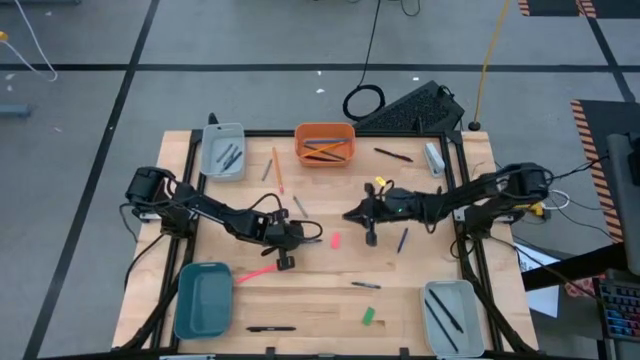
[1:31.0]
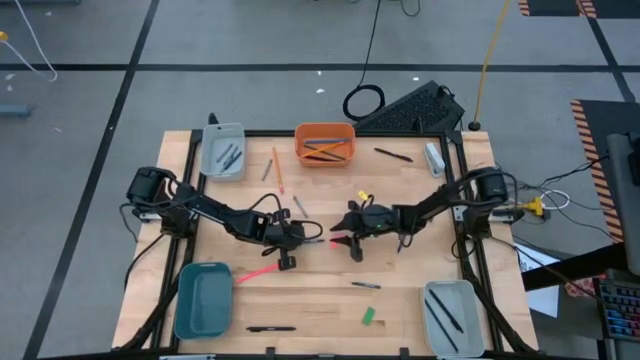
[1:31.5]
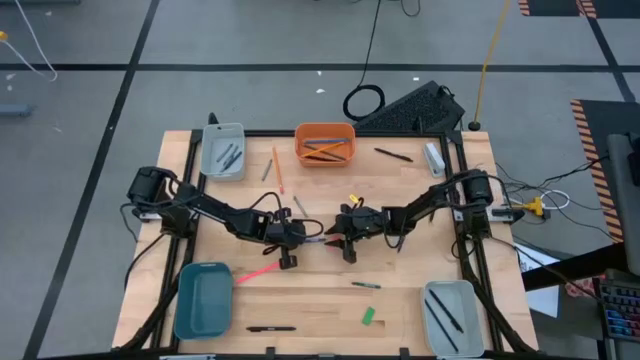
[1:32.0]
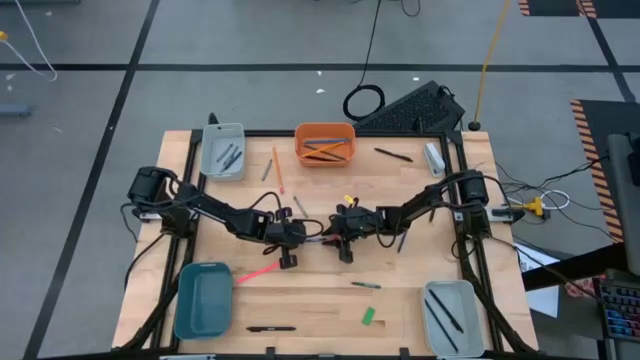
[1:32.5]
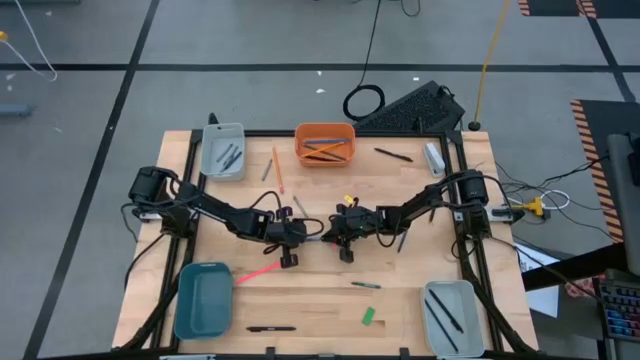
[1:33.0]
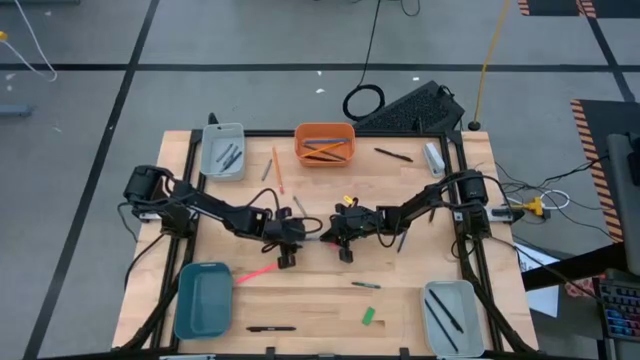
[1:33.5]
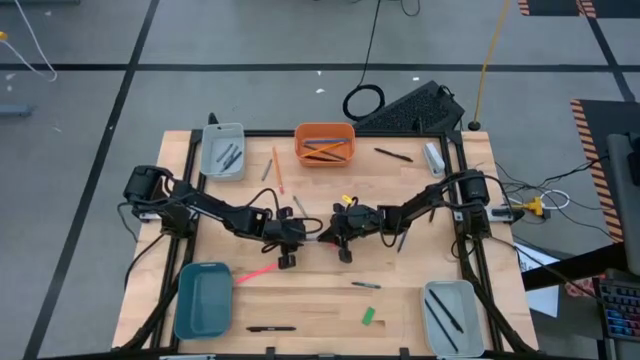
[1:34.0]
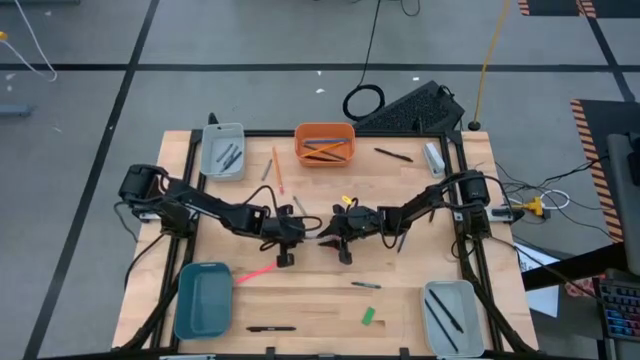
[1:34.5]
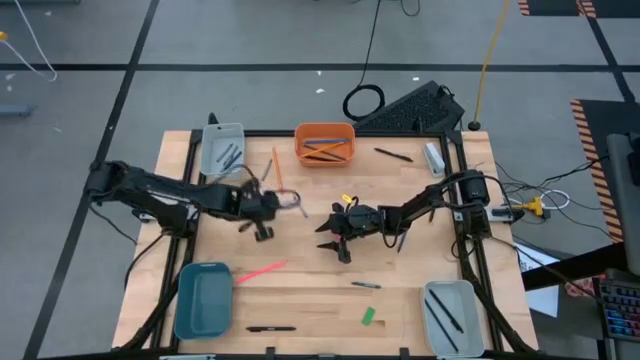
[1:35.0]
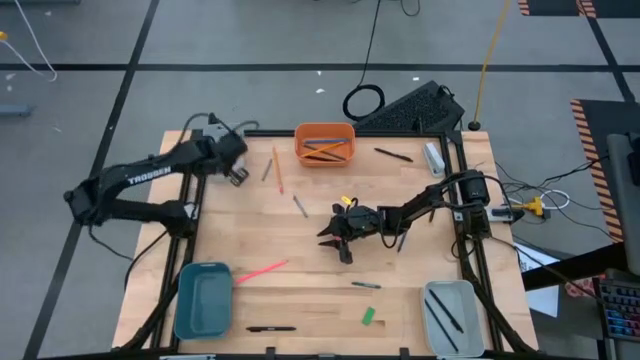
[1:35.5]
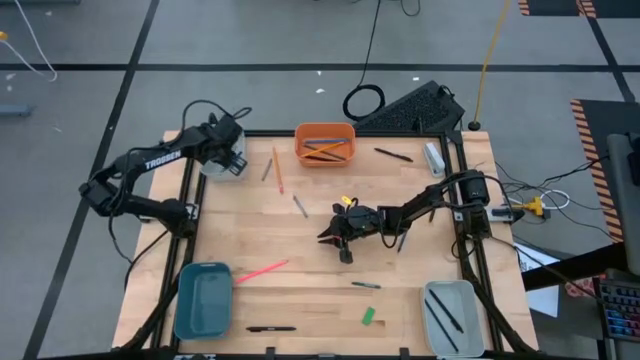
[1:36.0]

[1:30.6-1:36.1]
Task: Sort crayons/erasers/pens/pencils in bins
Put the blue crayon into the top gray bin

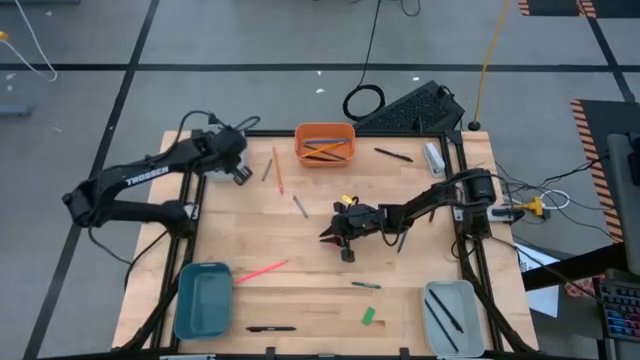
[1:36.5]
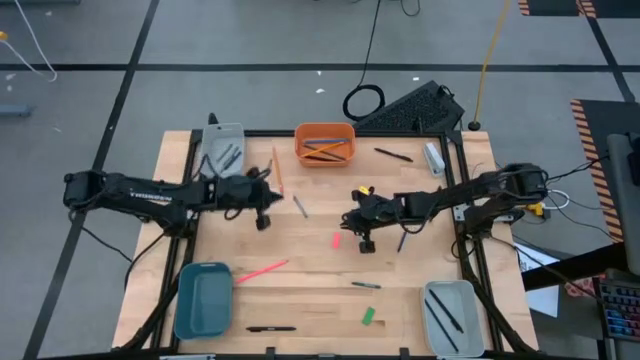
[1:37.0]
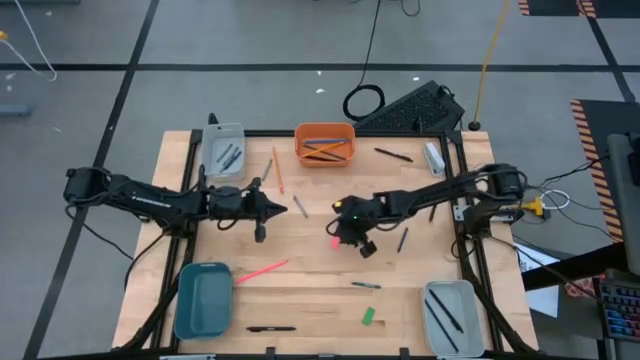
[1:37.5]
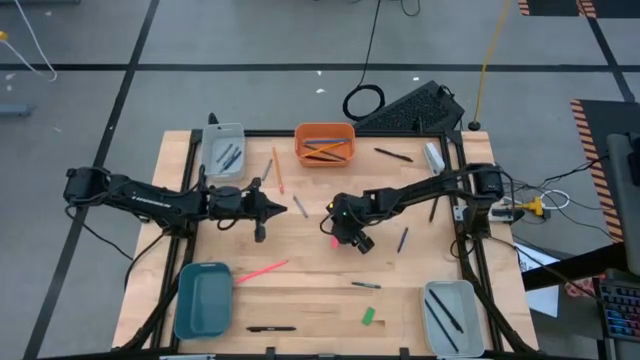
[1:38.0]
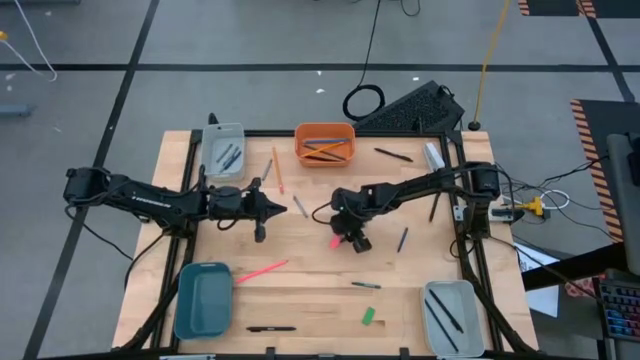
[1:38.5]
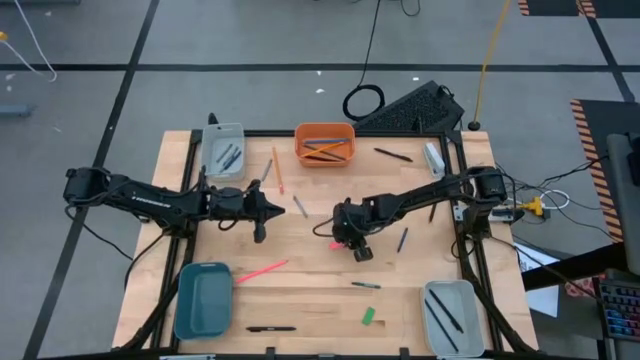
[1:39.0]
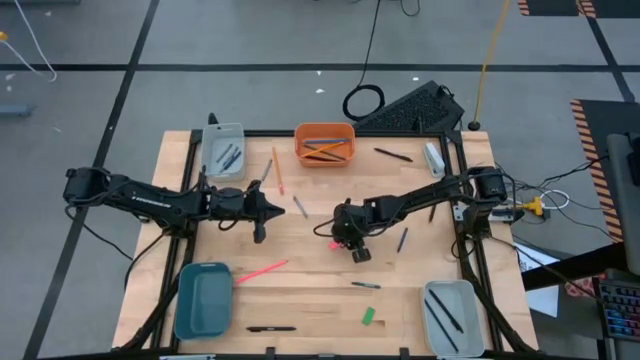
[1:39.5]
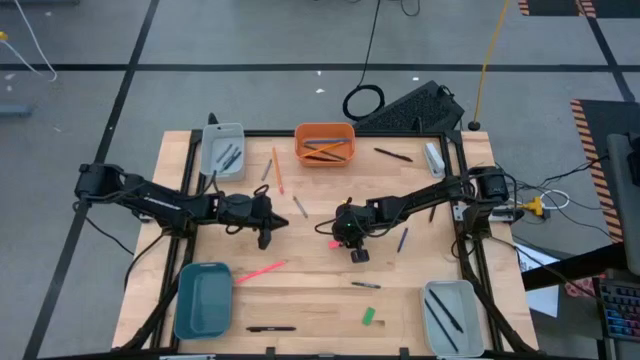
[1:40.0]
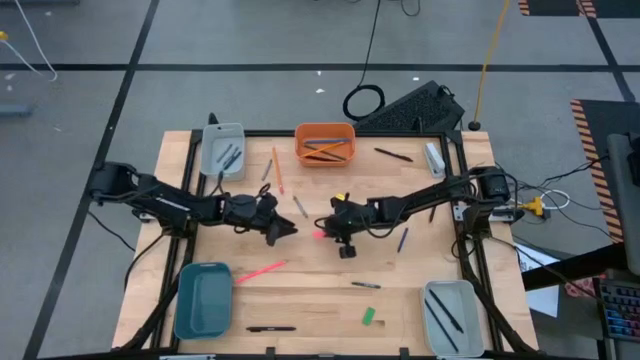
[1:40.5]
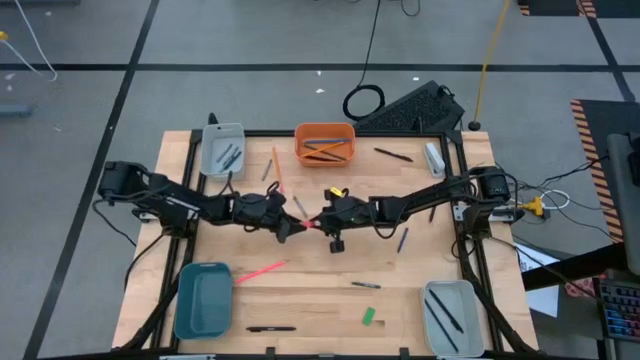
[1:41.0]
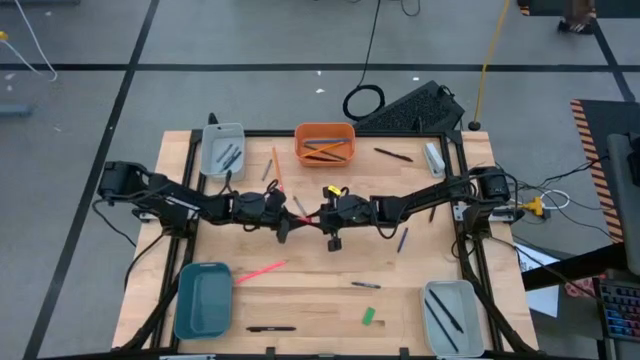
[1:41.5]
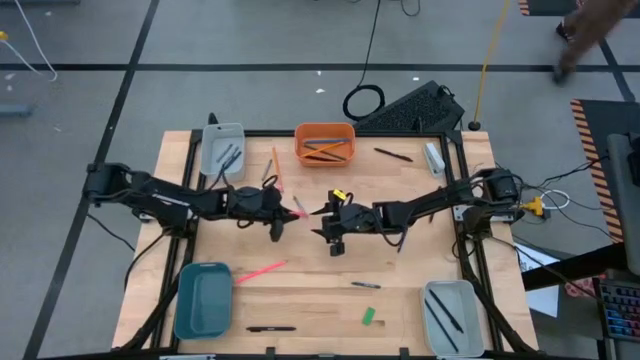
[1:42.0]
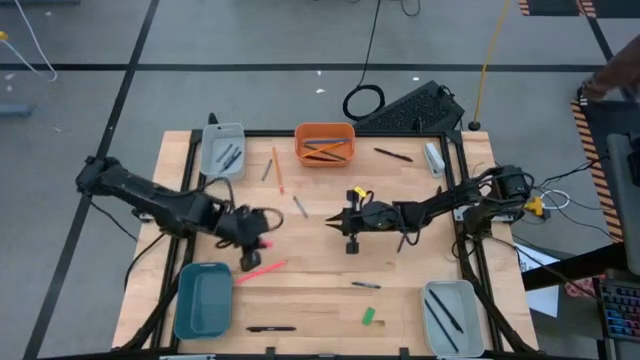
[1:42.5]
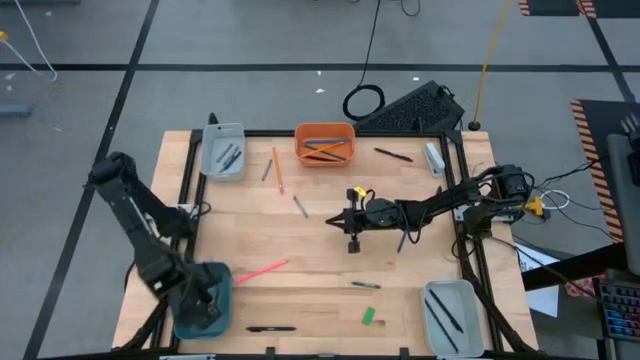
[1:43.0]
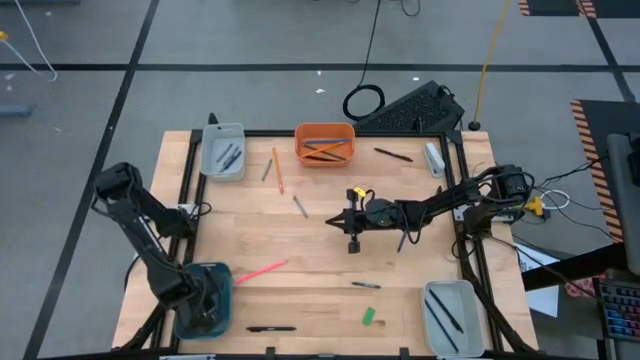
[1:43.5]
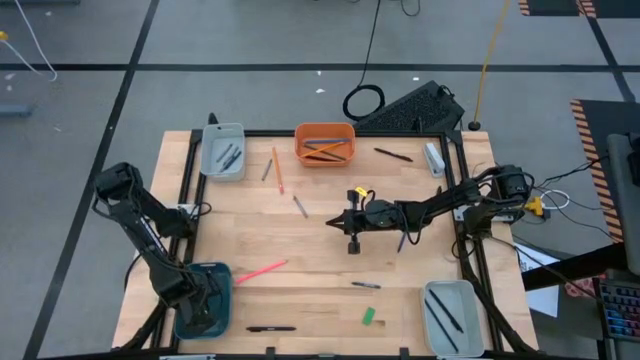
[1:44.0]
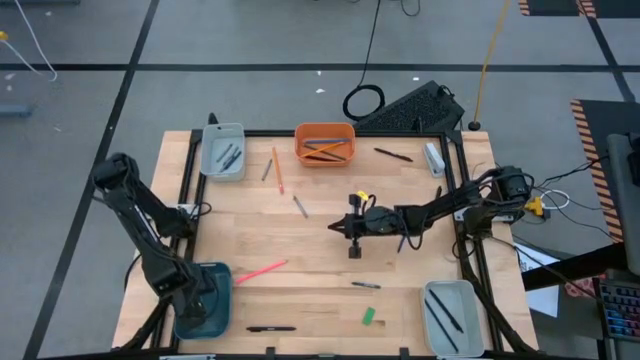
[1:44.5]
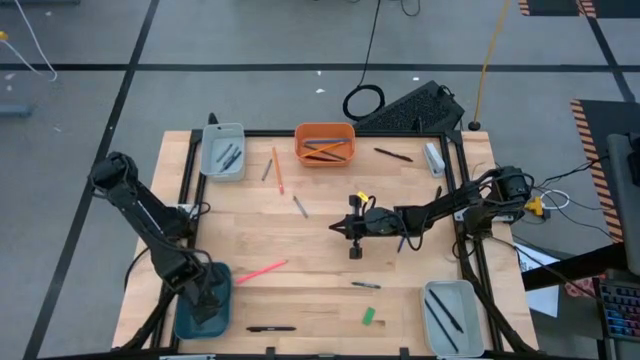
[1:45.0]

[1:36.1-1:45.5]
Put the pink eraser into the blue bin

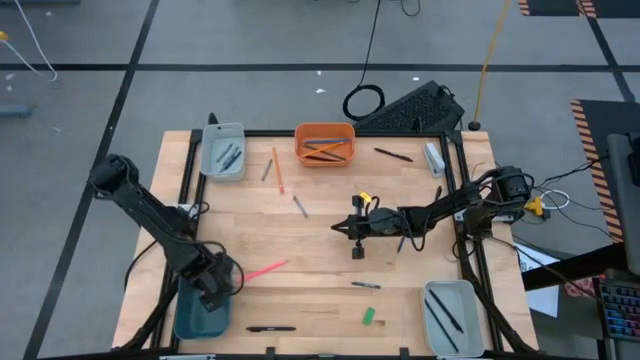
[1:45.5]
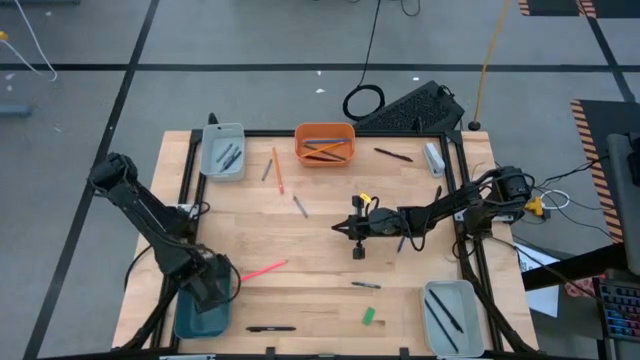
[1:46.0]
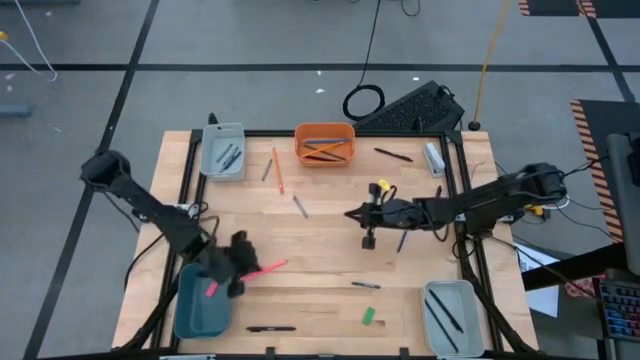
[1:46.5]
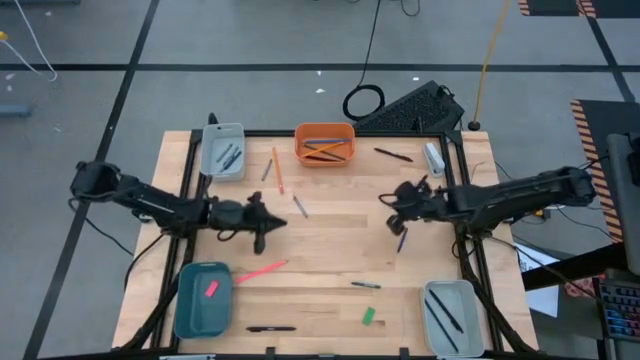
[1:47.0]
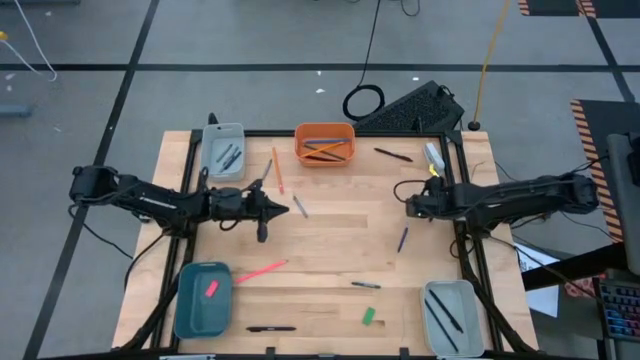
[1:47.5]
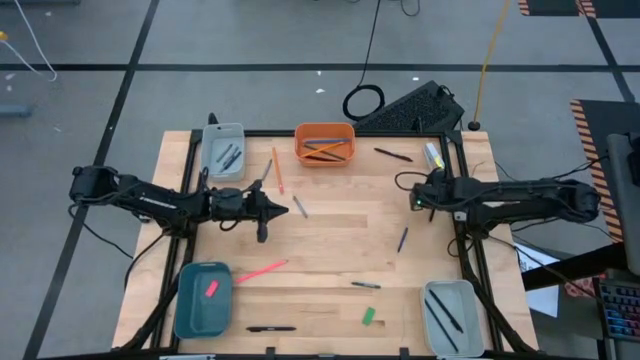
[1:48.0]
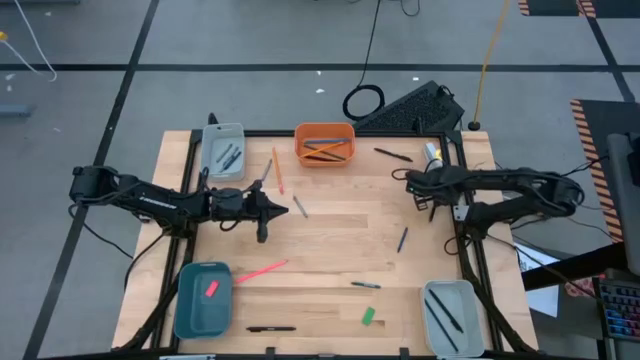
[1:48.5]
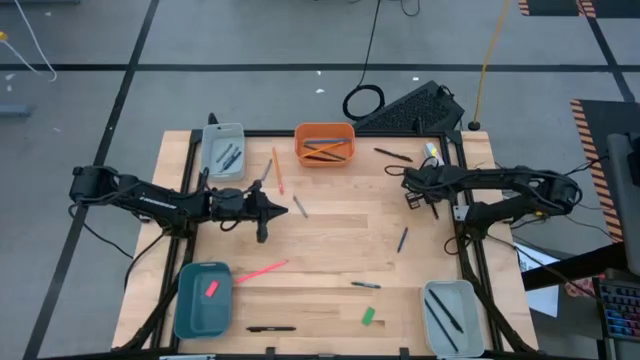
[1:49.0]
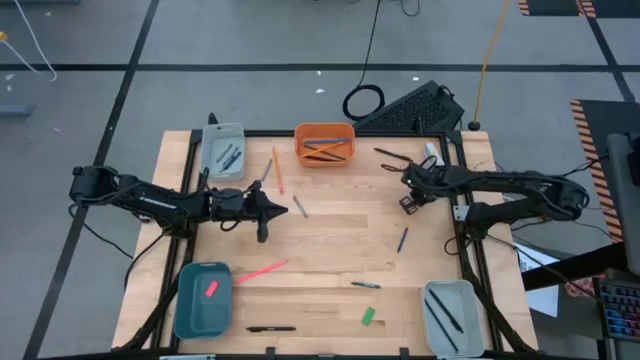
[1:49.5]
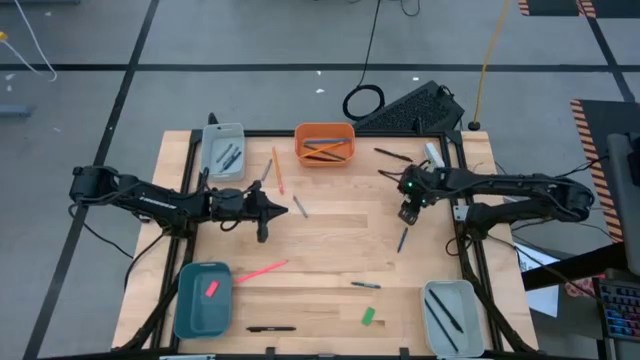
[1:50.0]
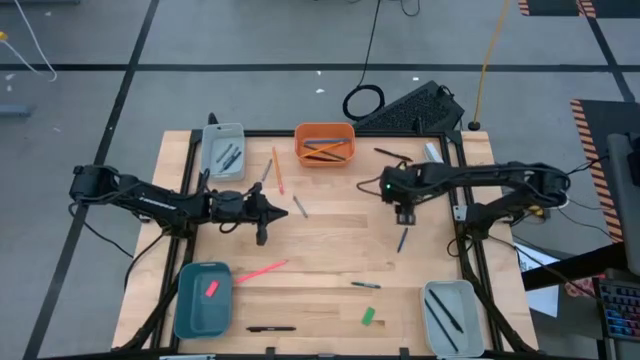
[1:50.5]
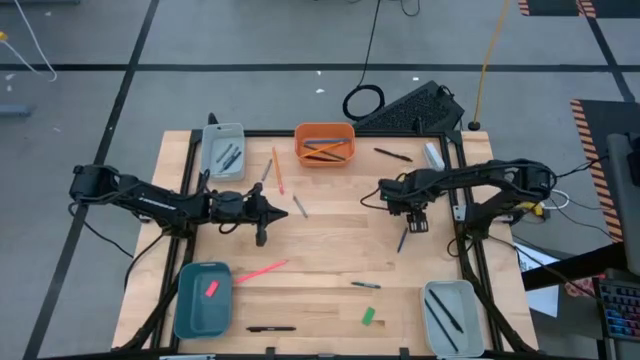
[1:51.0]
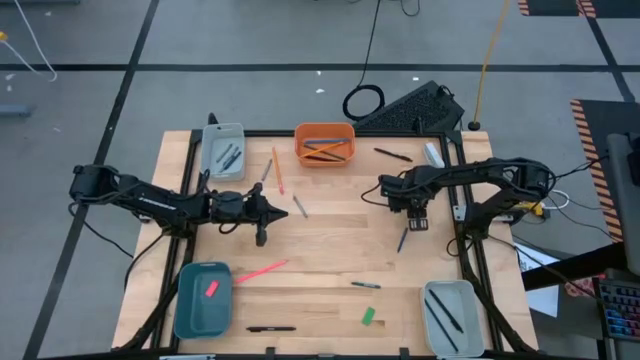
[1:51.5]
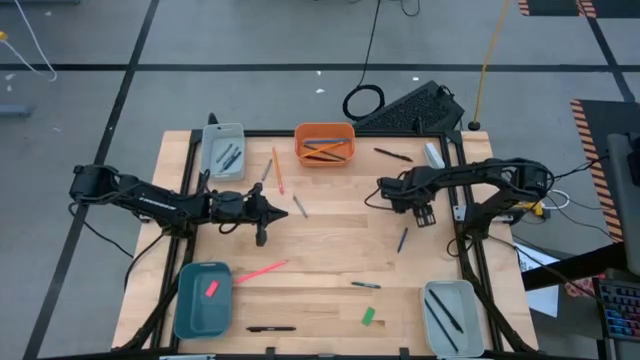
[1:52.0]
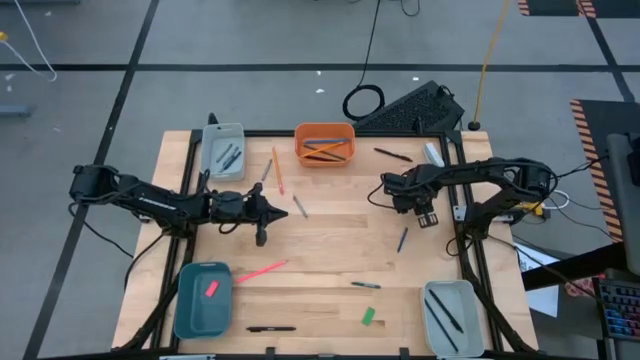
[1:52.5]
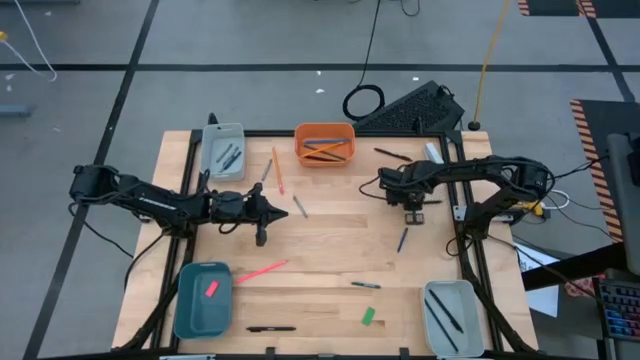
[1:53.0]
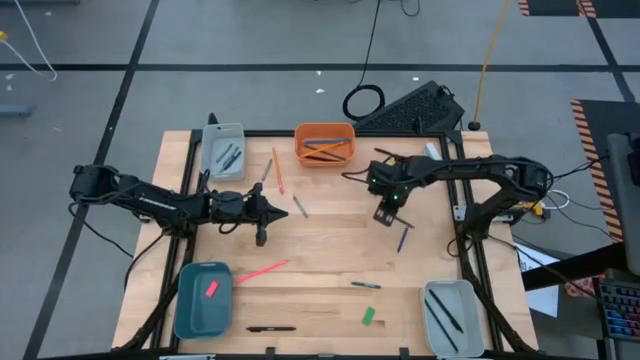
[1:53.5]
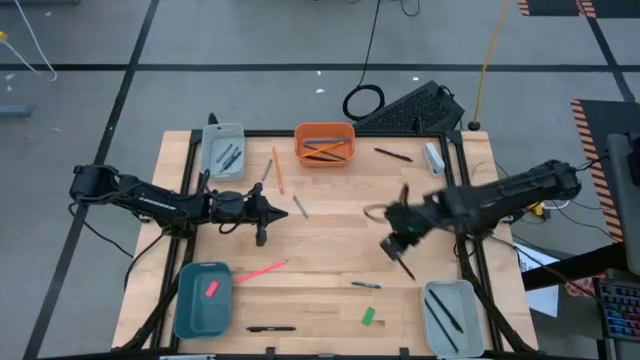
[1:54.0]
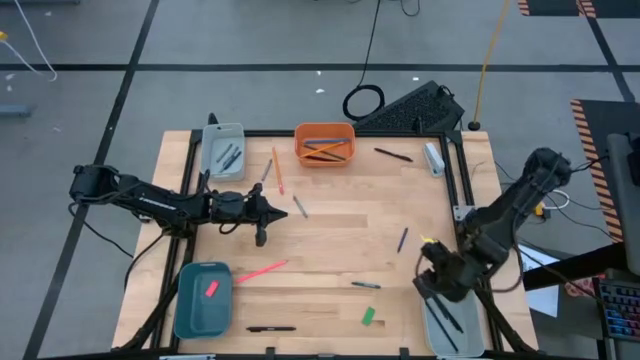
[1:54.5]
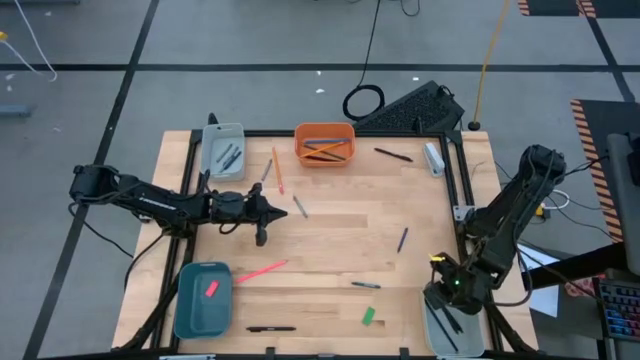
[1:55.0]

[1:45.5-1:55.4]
Put the black pen into the bottom gray bin
